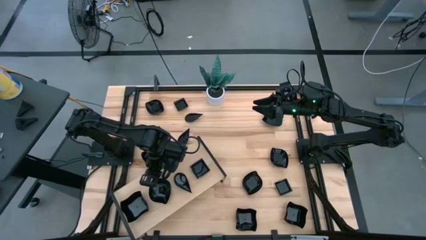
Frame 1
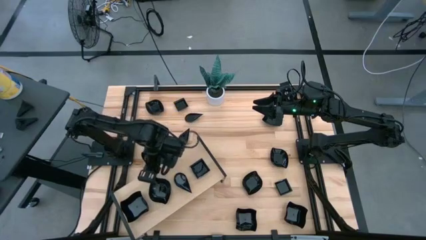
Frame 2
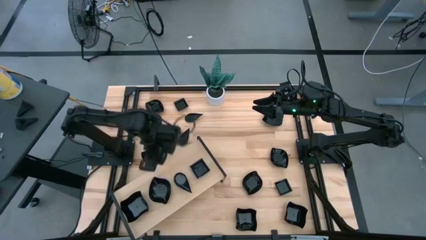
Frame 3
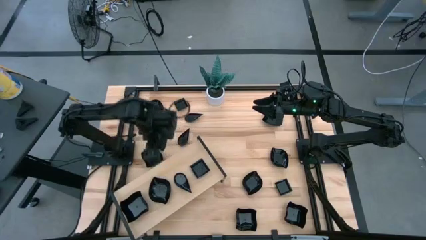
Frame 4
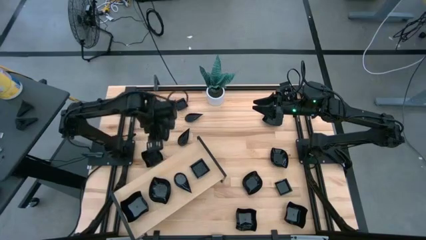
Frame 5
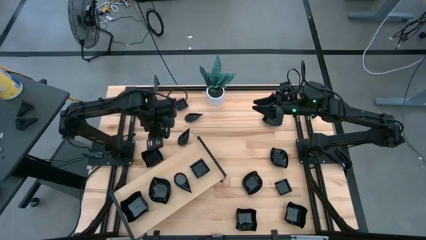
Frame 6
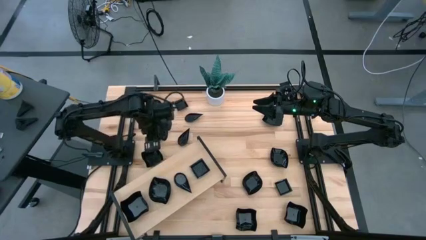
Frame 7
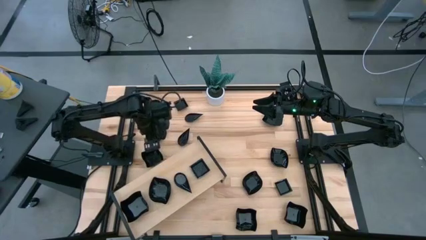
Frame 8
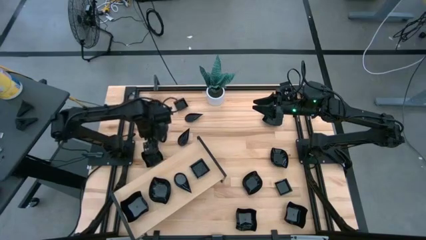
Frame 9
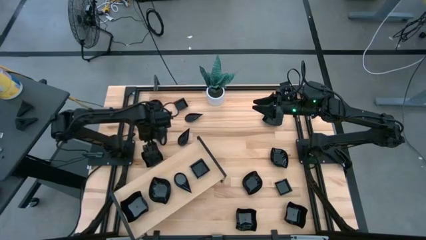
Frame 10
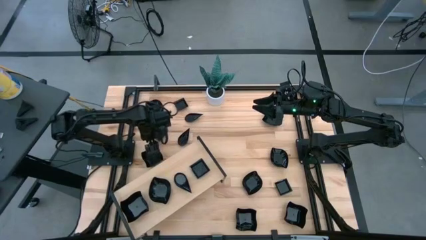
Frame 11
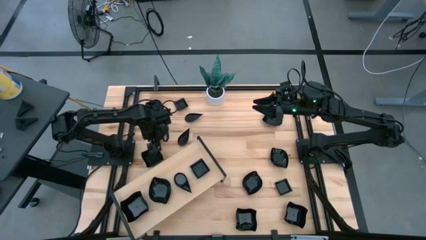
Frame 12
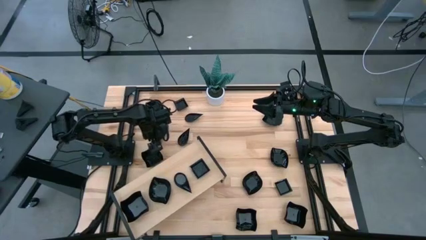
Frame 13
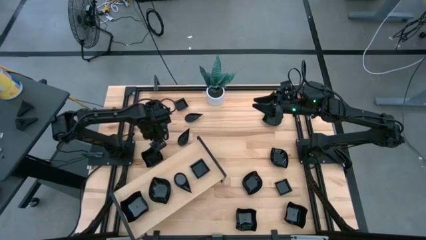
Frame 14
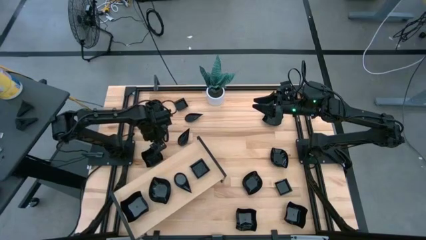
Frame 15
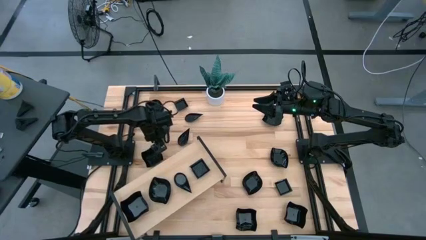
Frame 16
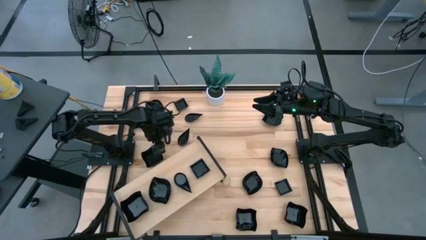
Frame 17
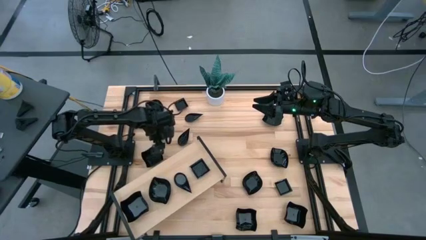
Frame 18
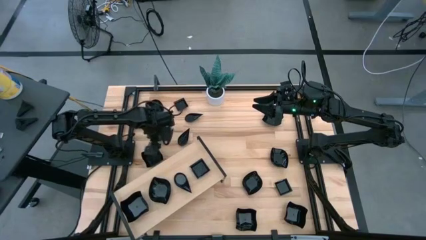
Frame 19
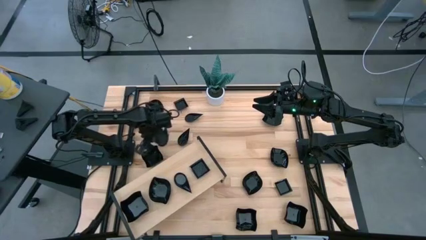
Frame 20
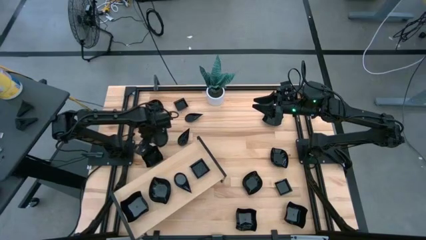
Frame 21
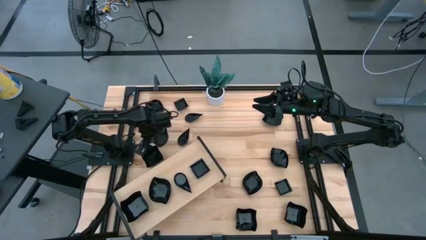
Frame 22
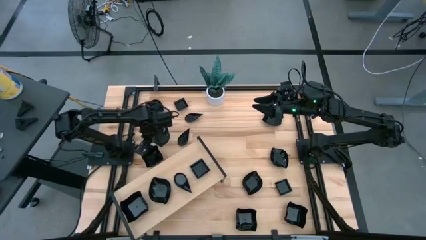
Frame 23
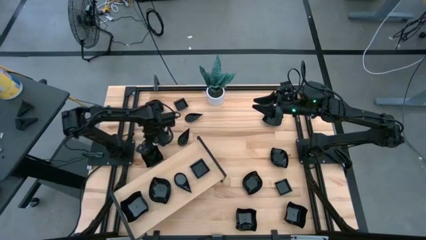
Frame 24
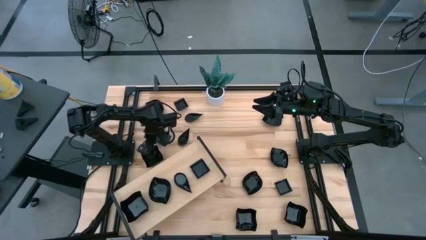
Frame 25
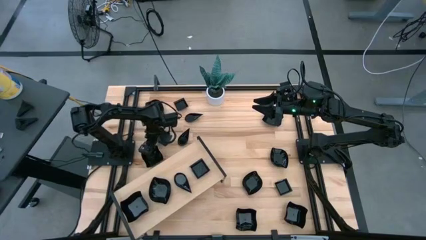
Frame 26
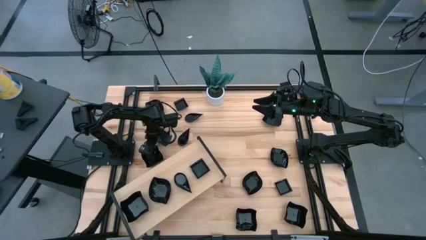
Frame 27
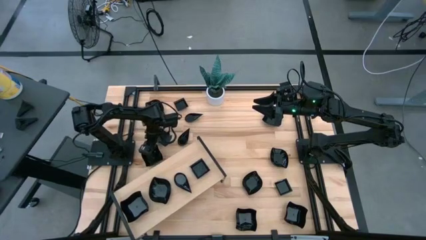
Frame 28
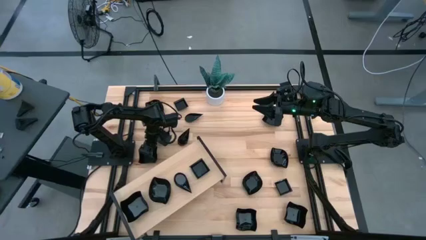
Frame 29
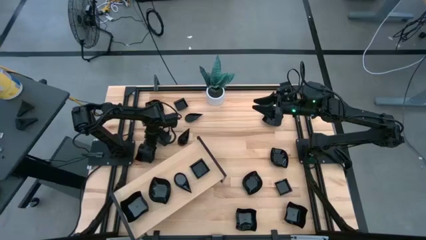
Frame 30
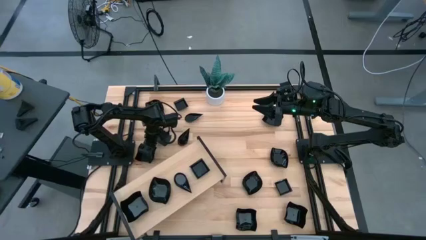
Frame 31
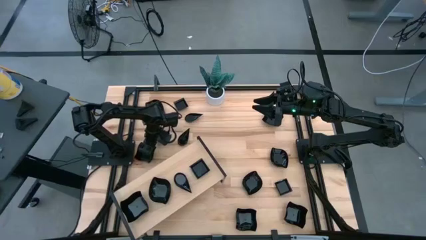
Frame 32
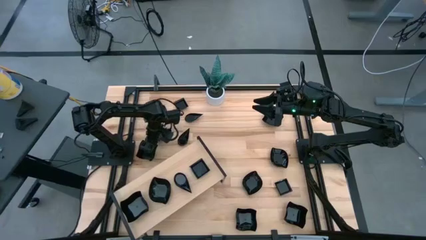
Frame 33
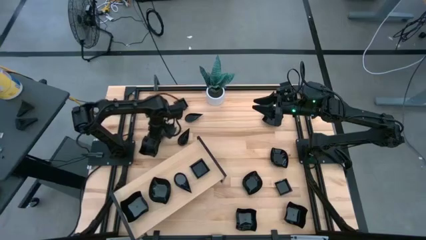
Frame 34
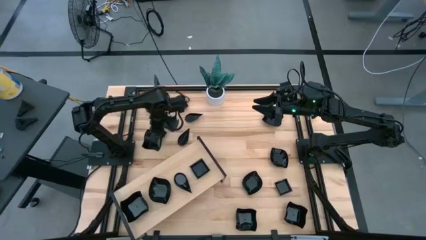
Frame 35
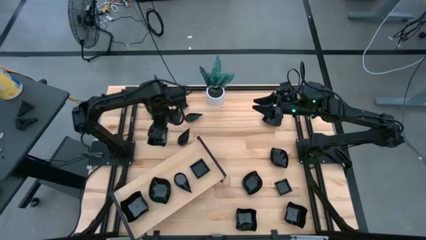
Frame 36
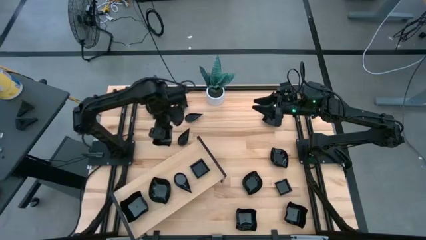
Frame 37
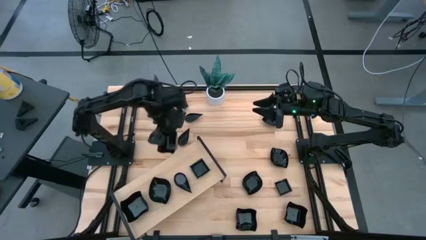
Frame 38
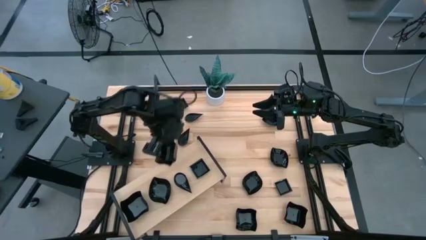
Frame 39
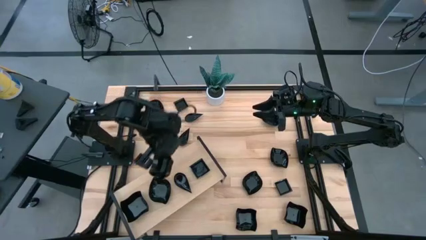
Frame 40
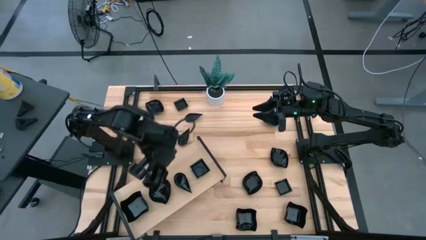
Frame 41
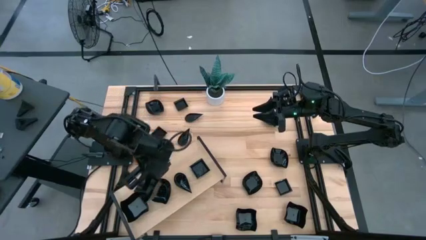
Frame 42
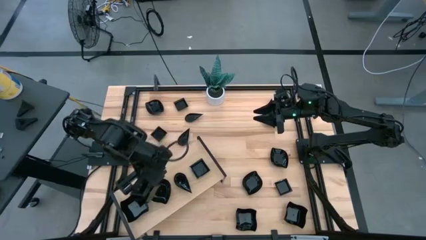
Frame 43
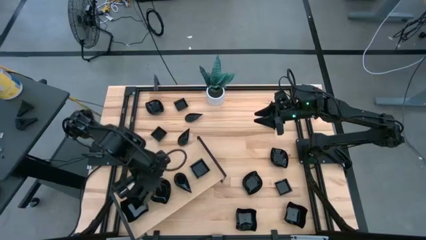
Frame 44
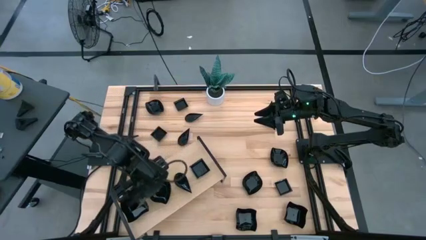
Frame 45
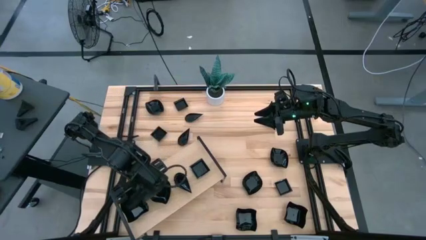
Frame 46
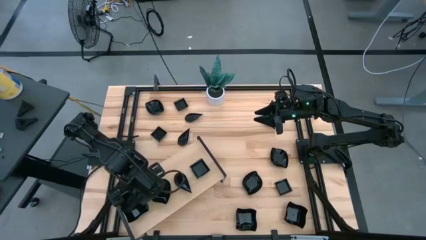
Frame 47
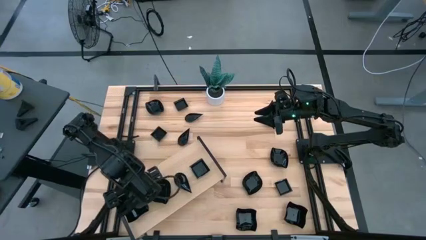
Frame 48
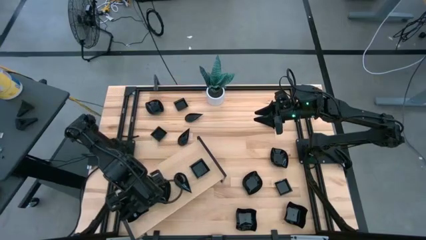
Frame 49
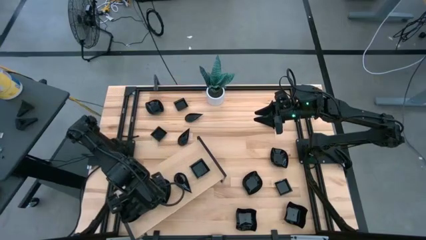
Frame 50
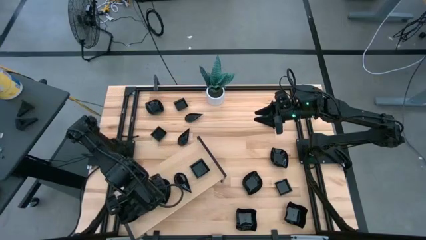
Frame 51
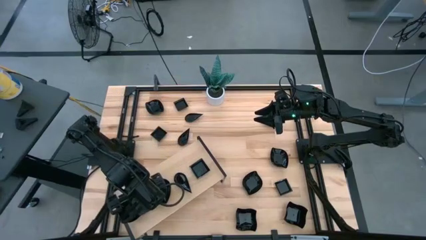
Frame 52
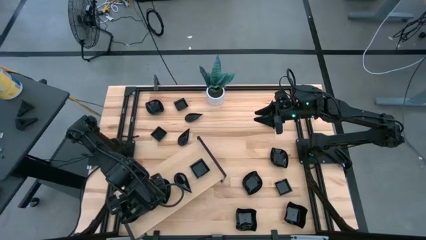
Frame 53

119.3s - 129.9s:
Task: Pick & Place Mini shaped plates
Stack the black distorted square plate on top of the black distorted square plate on the shelf

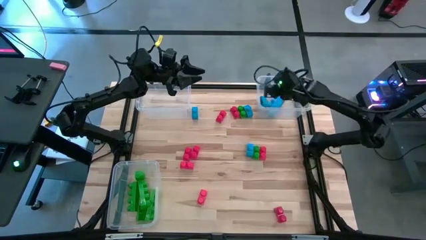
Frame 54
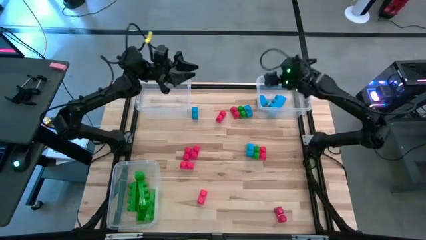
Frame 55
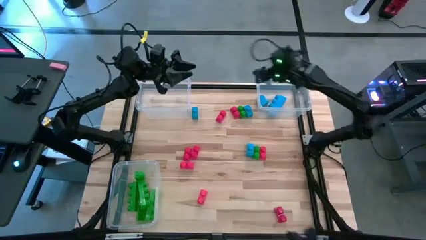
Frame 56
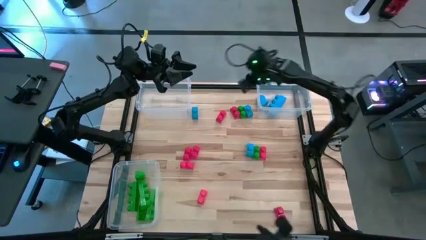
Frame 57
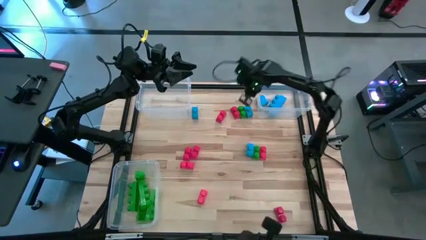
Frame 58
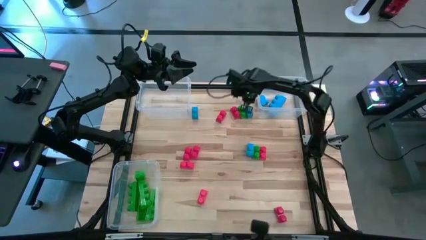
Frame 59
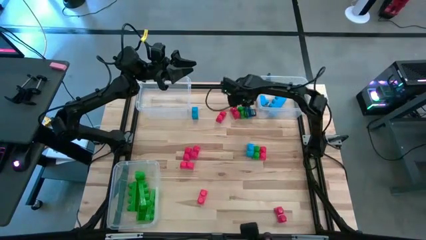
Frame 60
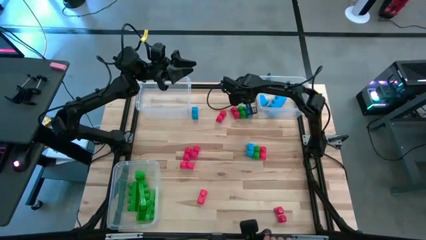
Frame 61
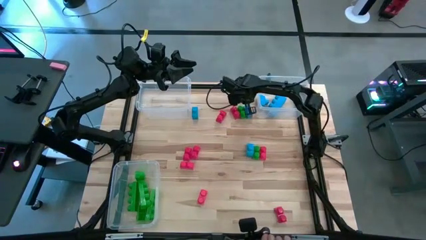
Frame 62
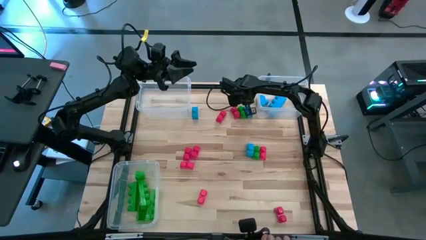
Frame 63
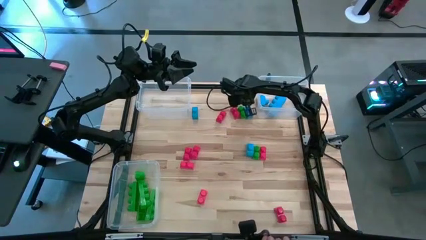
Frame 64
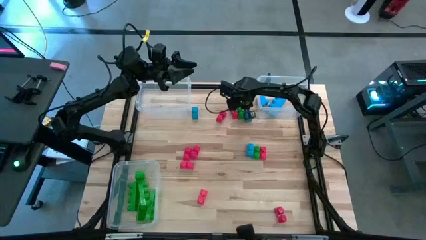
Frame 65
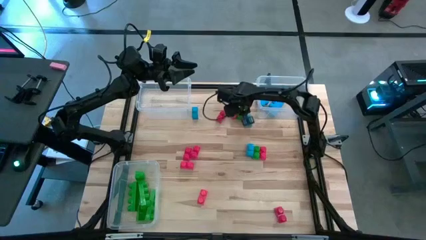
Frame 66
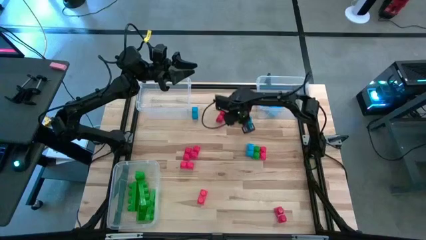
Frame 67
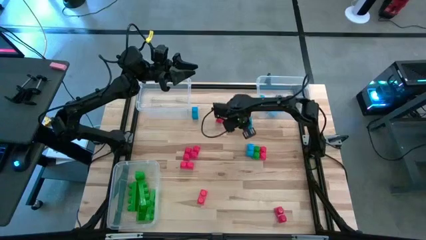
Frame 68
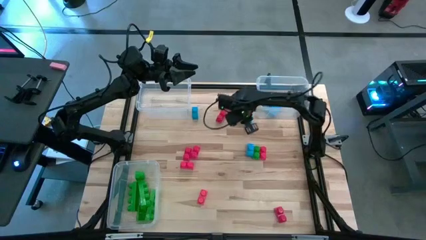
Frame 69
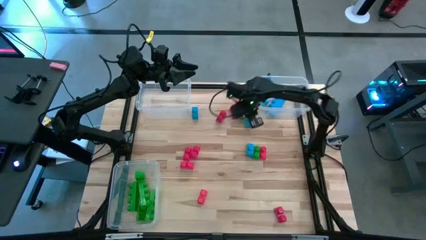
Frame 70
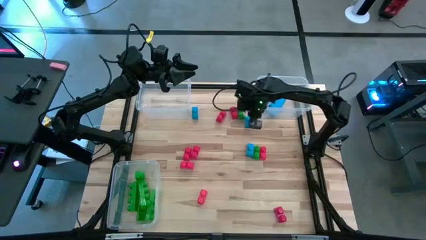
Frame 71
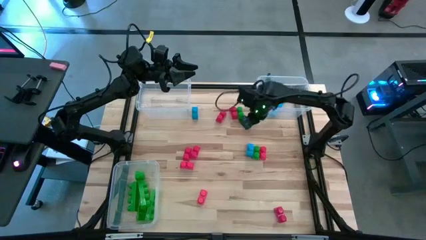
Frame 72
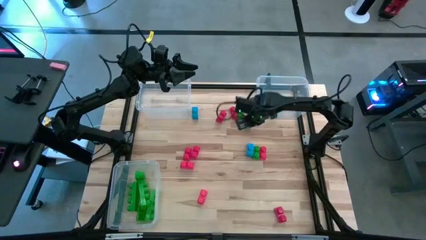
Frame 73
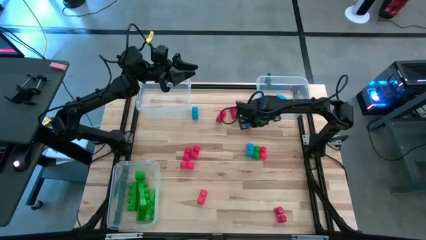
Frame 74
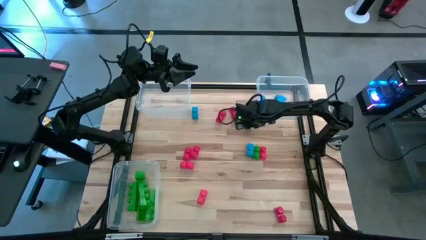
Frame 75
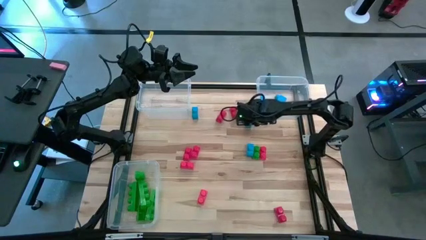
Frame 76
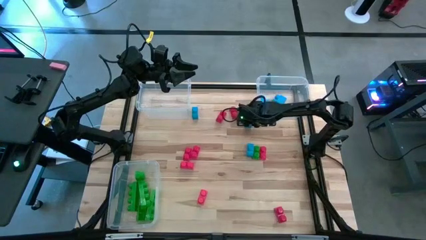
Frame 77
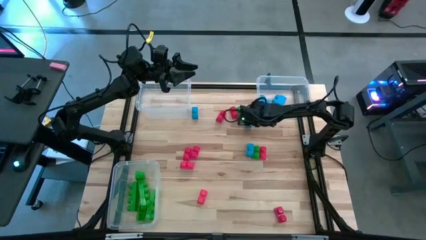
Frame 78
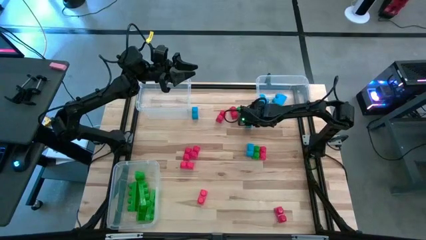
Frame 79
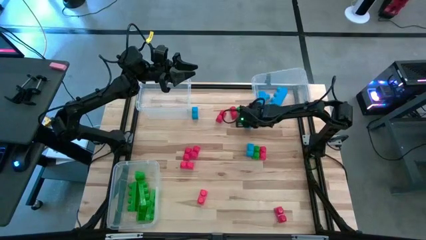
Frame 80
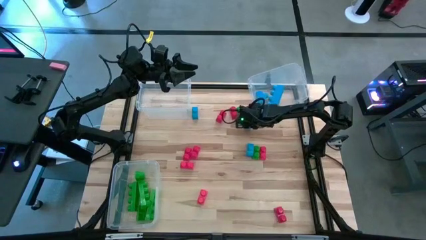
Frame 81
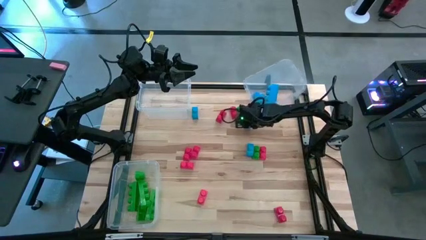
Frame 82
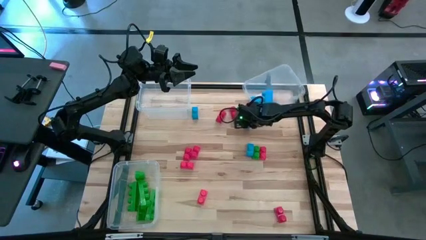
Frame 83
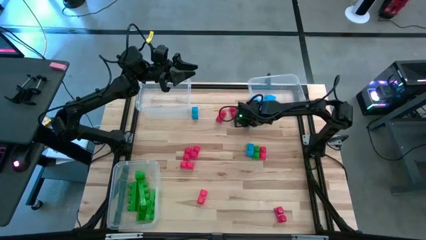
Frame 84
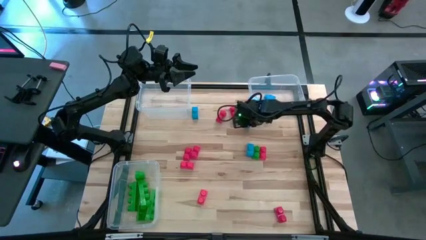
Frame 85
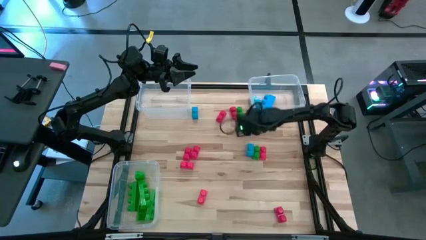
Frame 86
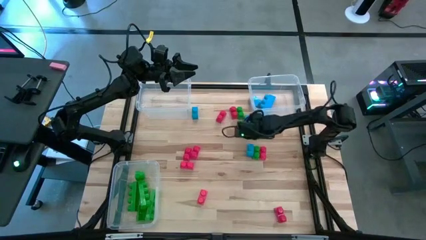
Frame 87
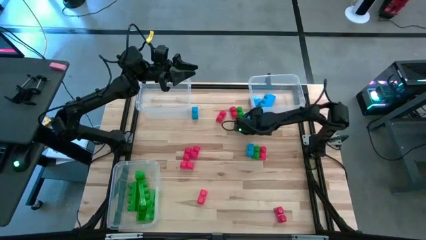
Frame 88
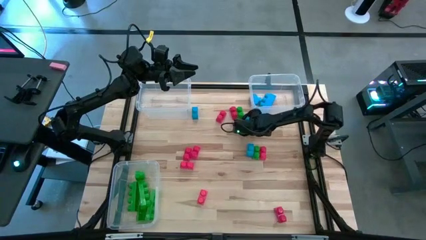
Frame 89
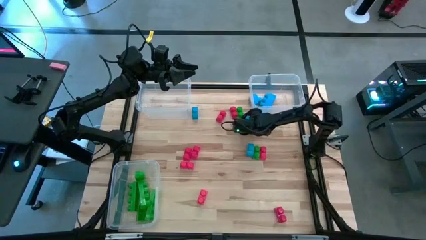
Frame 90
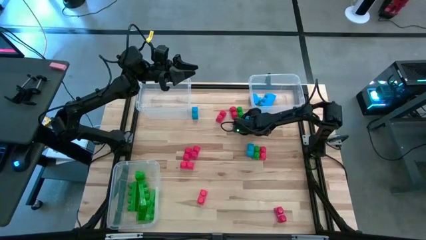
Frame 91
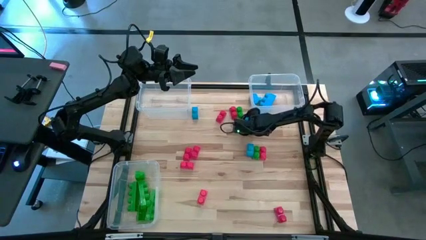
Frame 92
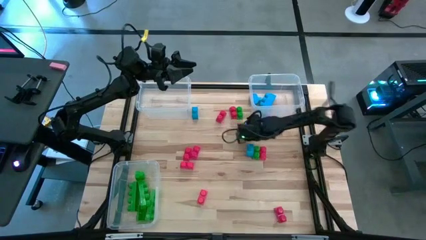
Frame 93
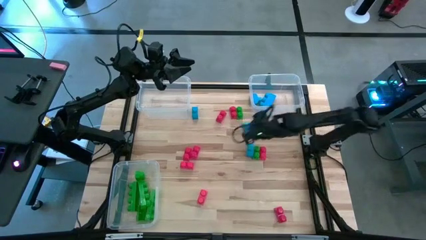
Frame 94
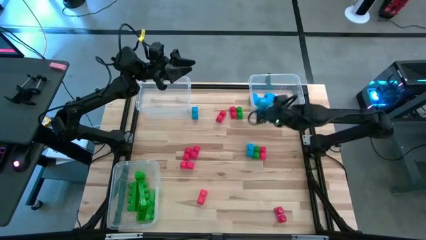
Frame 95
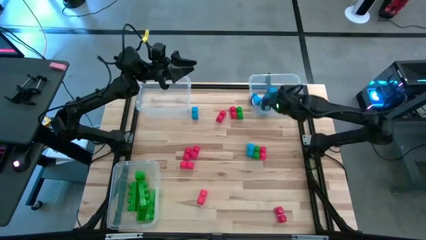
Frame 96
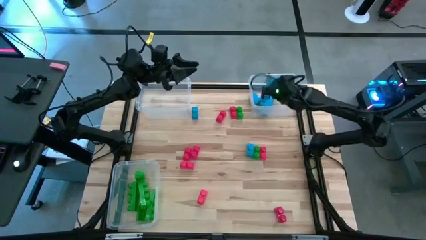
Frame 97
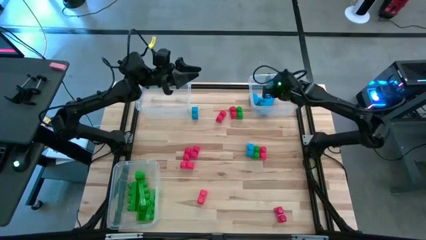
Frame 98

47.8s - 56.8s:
Task: Sort blocks
Put the blue game piece into the top right transparent bin
